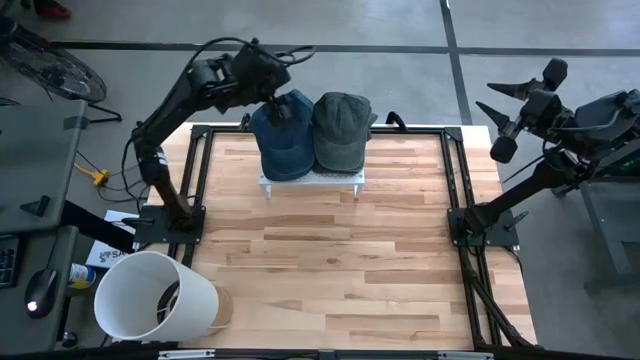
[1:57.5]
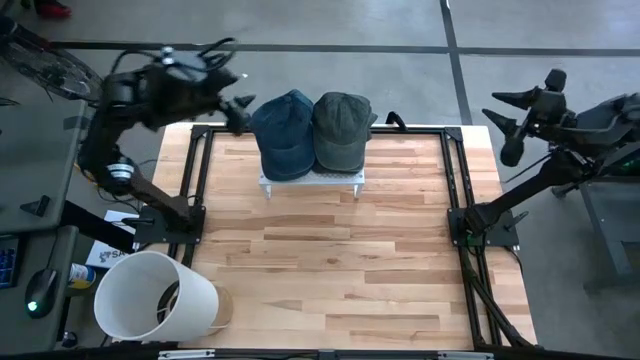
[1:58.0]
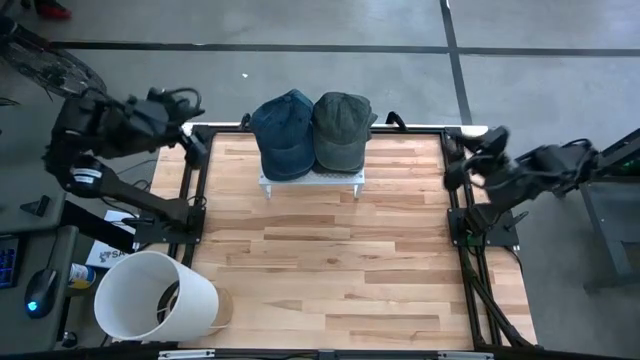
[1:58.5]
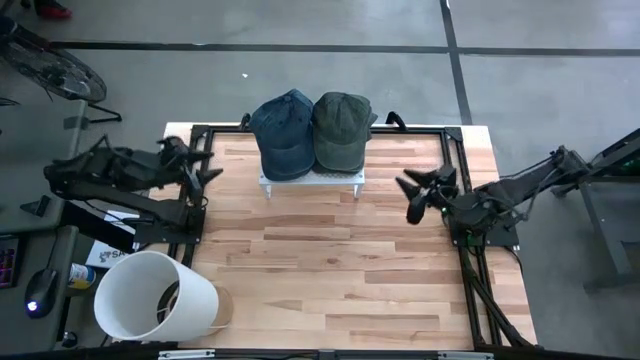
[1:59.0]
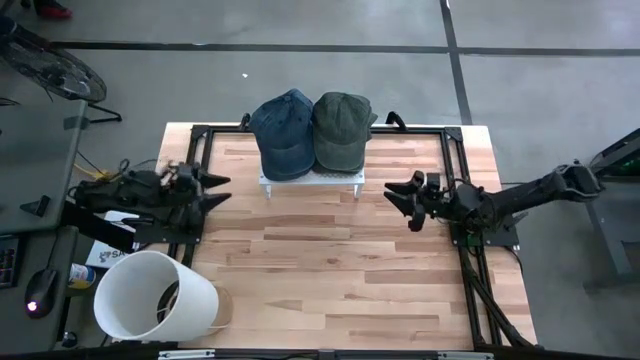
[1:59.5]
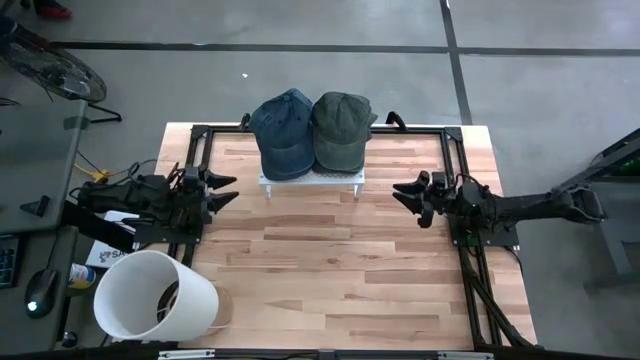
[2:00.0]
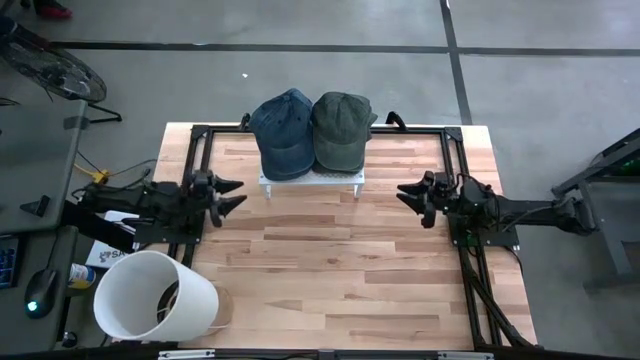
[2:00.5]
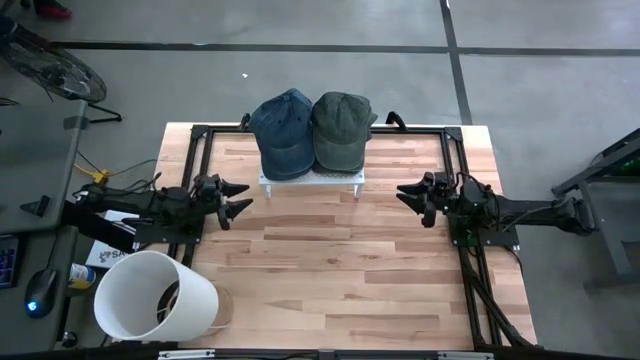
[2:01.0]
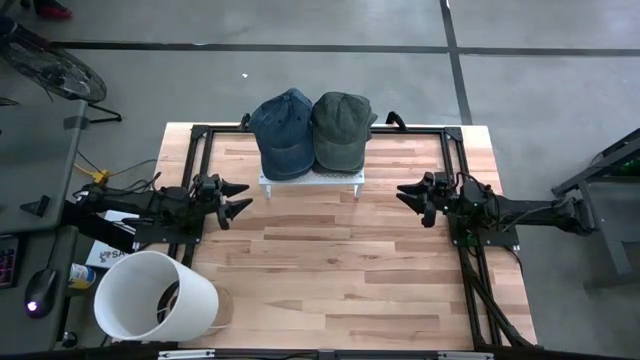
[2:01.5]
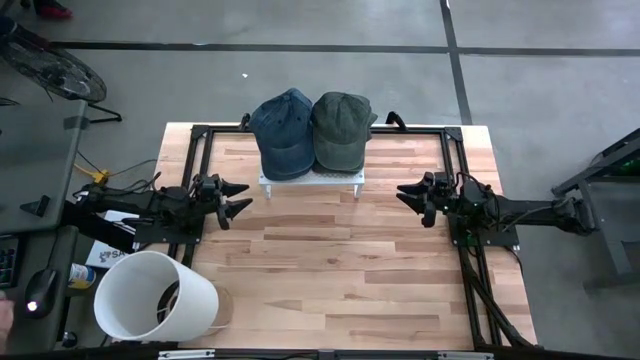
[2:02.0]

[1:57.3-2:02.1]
Task: Pick & Place hat
Return to Home Position

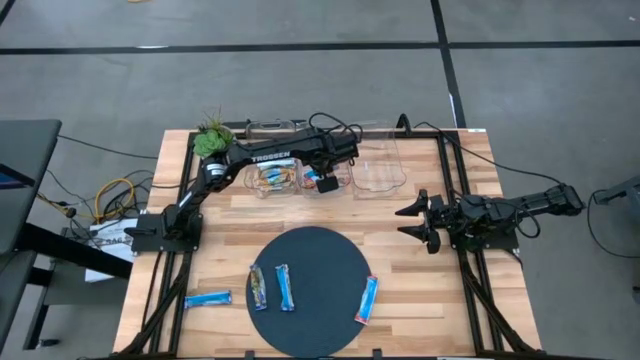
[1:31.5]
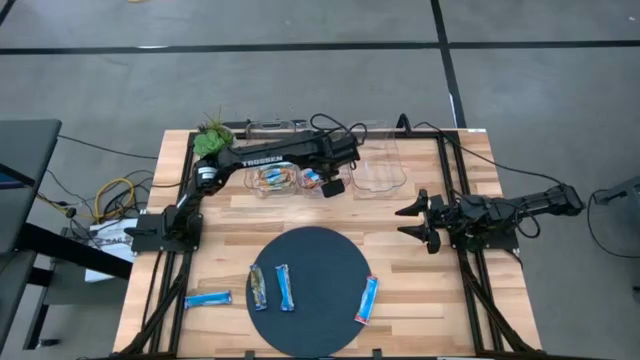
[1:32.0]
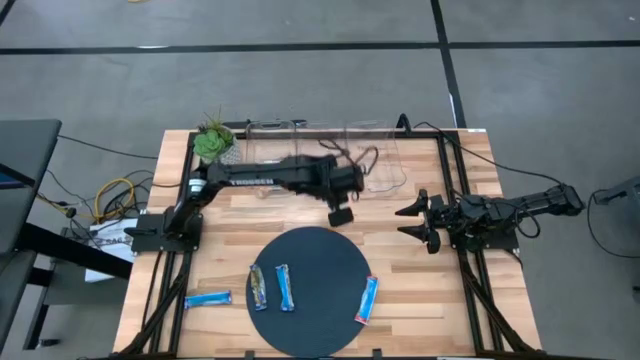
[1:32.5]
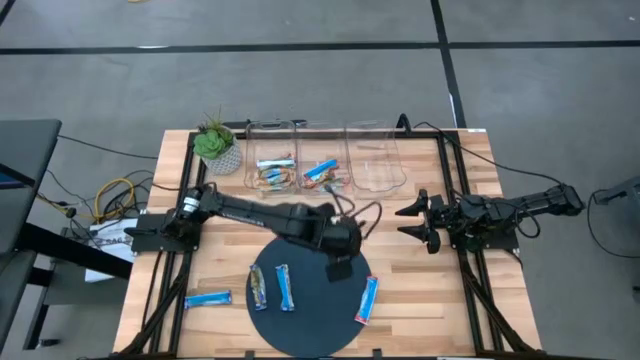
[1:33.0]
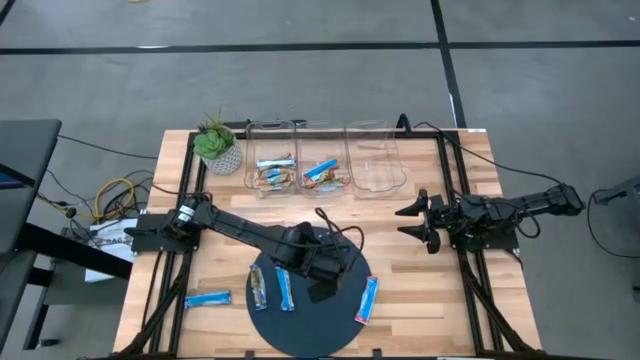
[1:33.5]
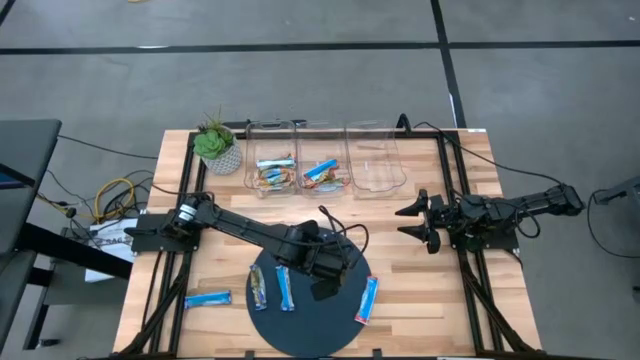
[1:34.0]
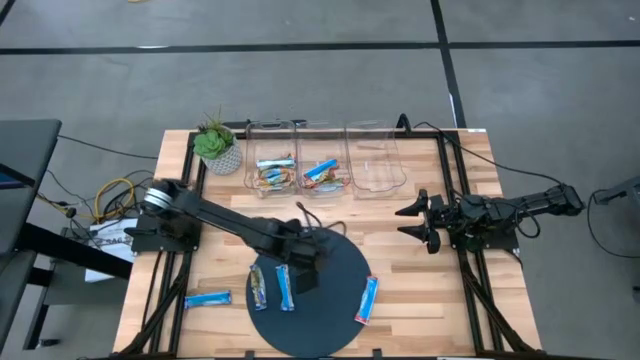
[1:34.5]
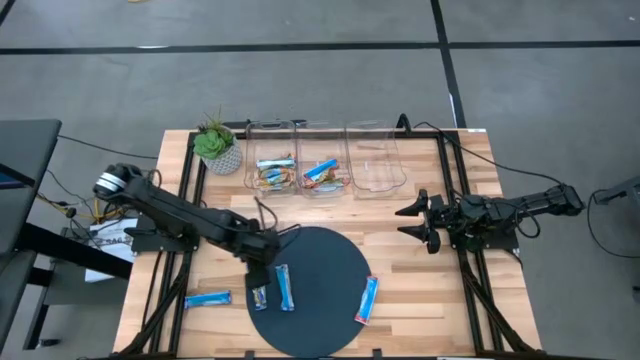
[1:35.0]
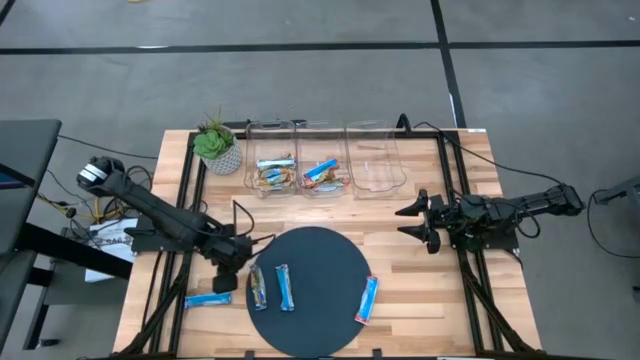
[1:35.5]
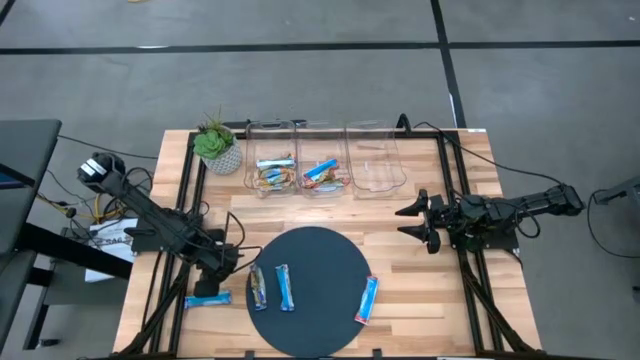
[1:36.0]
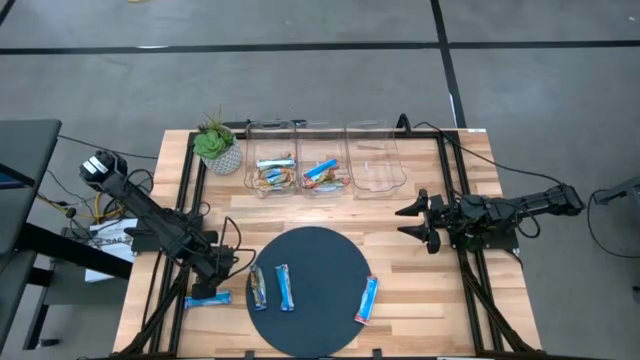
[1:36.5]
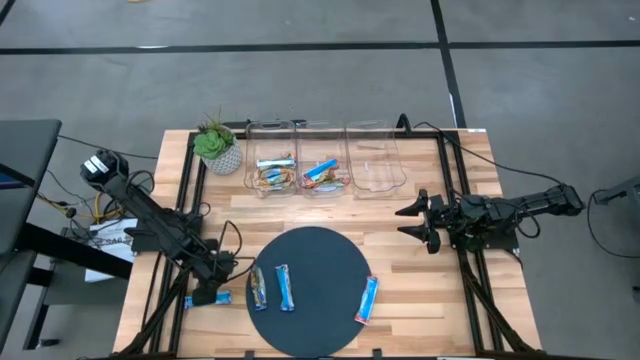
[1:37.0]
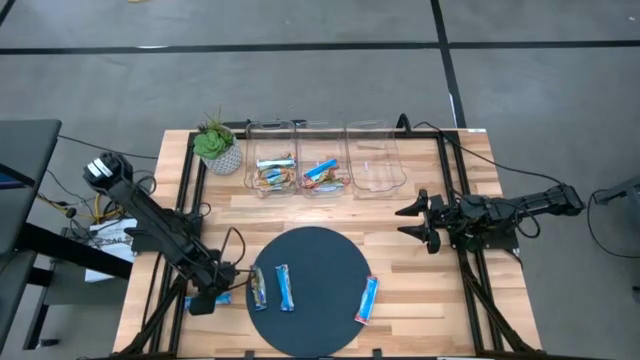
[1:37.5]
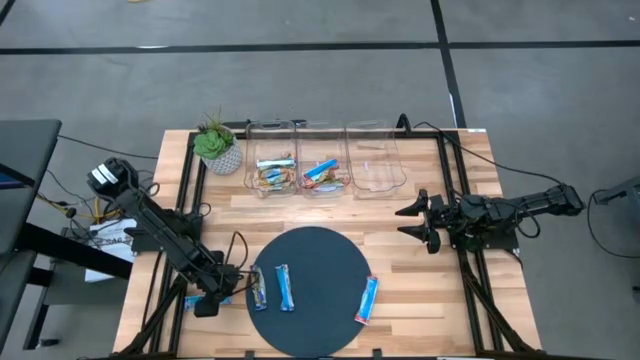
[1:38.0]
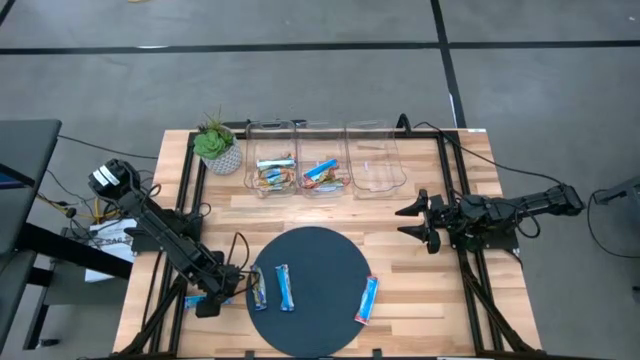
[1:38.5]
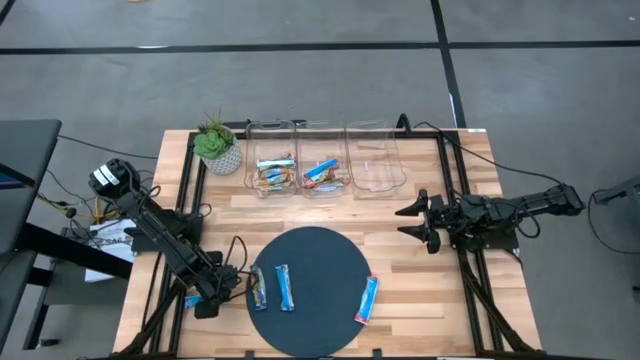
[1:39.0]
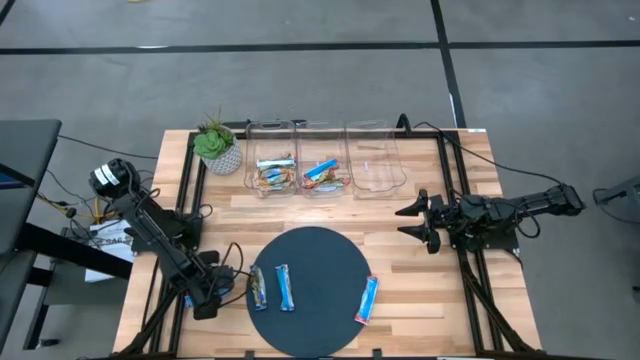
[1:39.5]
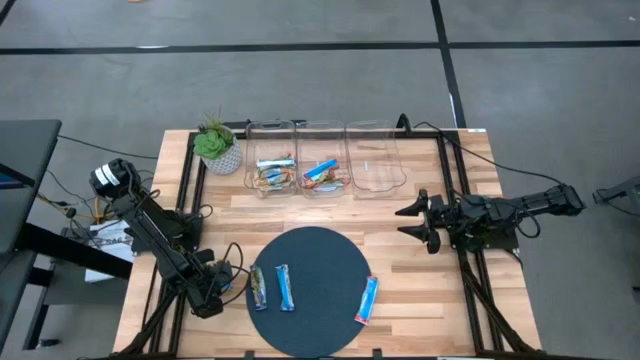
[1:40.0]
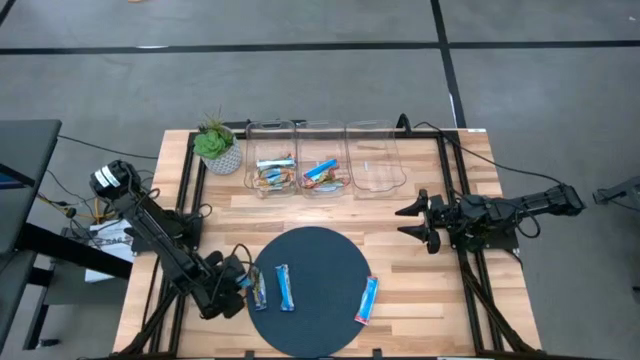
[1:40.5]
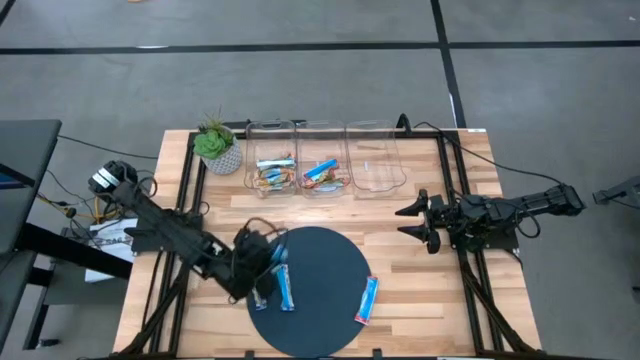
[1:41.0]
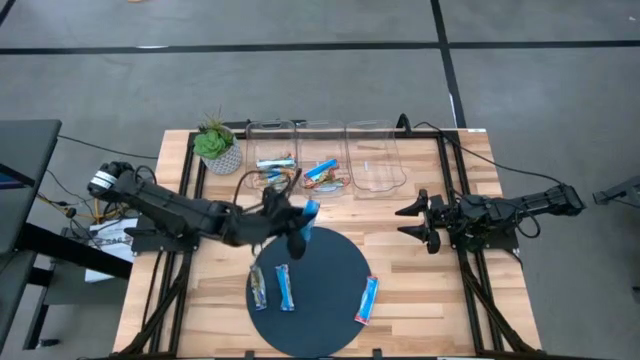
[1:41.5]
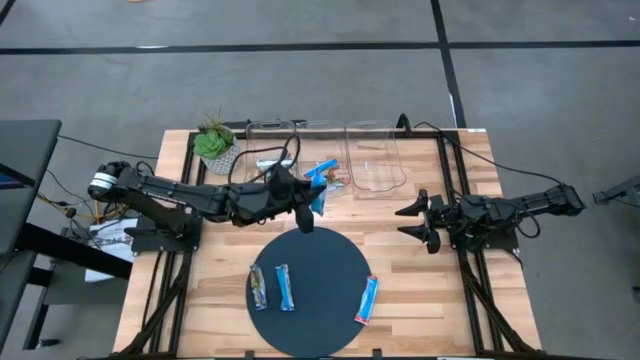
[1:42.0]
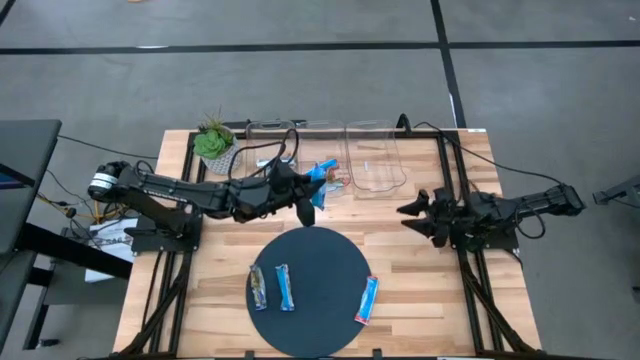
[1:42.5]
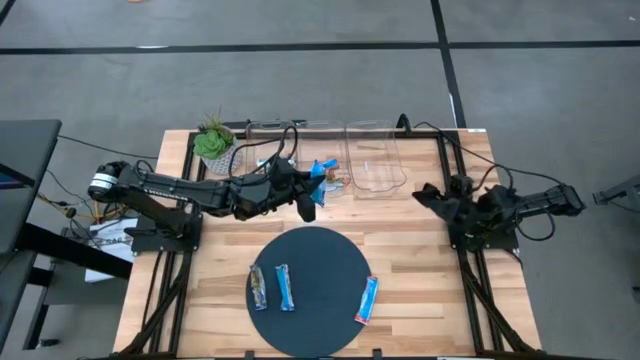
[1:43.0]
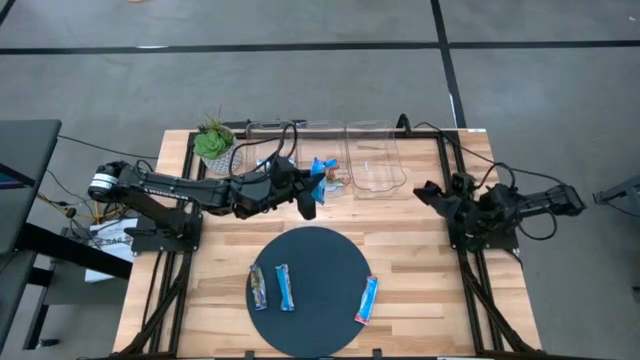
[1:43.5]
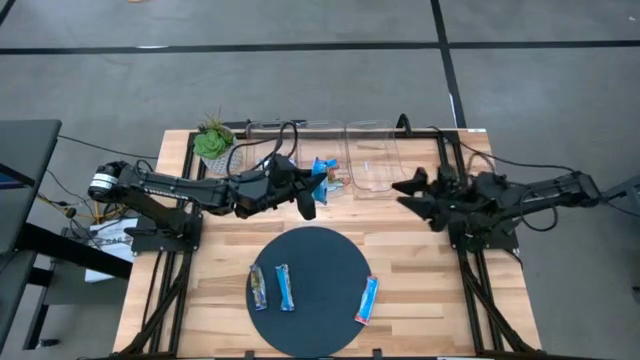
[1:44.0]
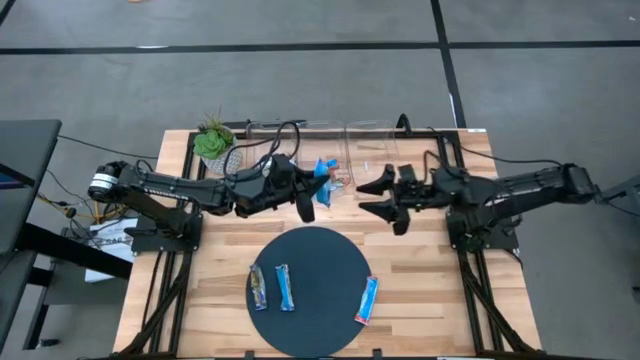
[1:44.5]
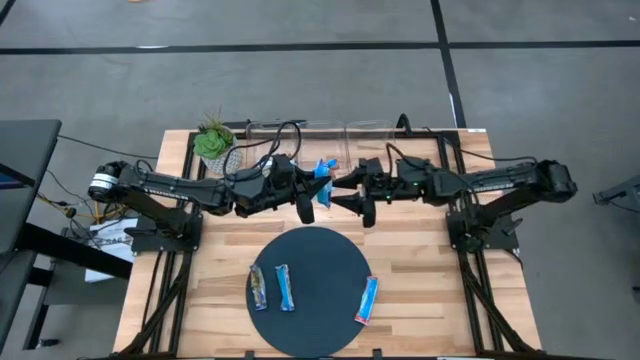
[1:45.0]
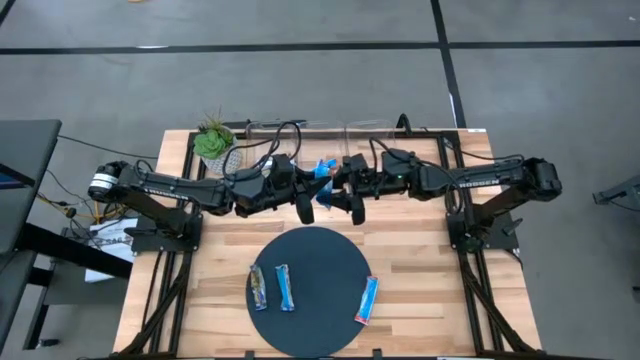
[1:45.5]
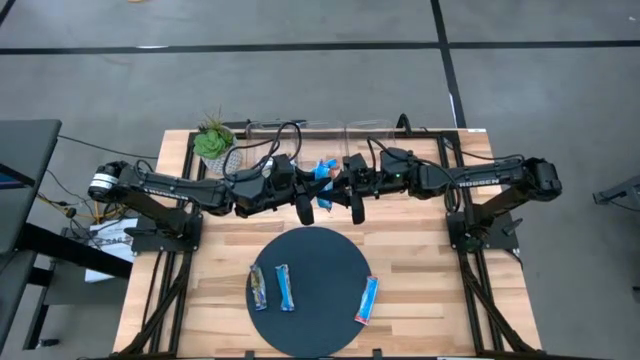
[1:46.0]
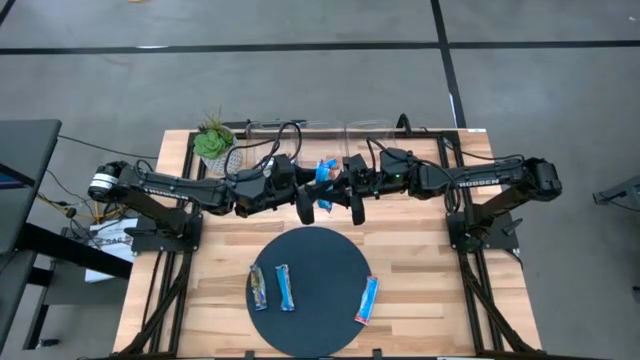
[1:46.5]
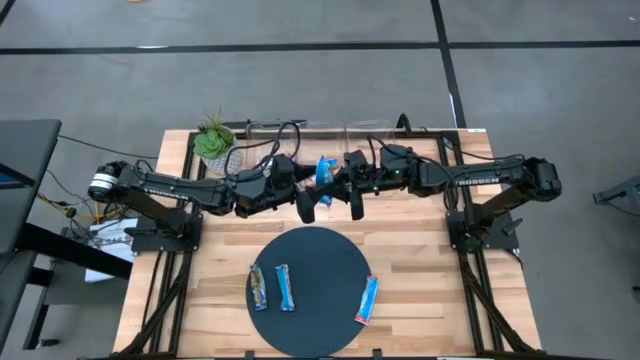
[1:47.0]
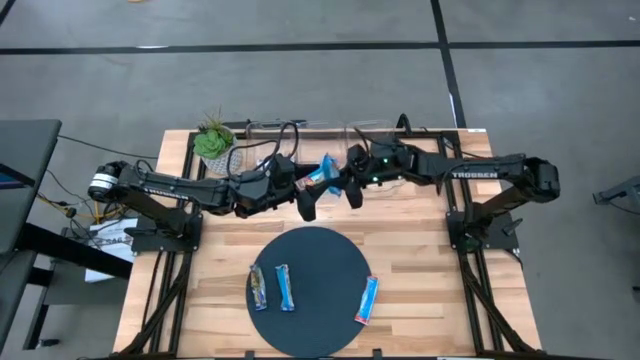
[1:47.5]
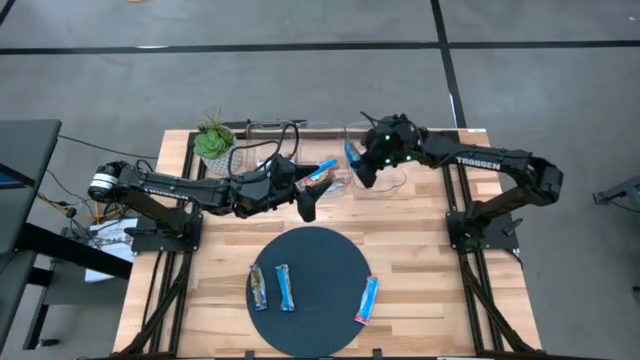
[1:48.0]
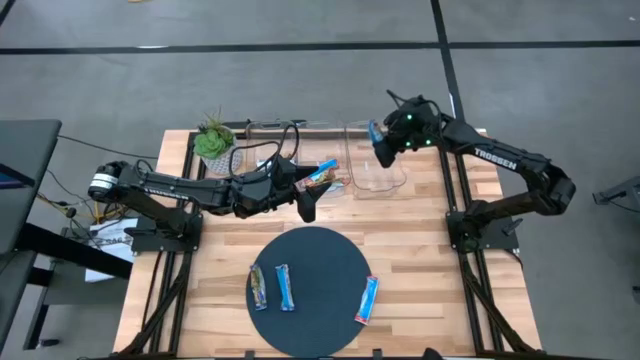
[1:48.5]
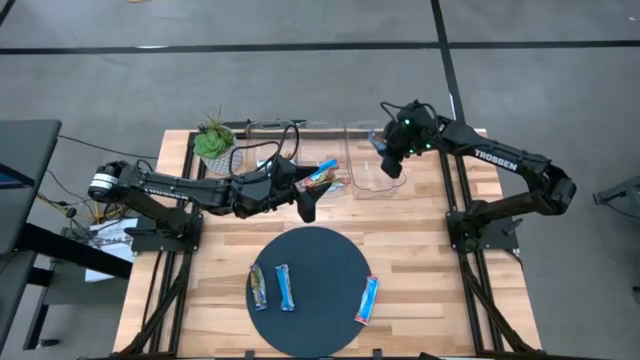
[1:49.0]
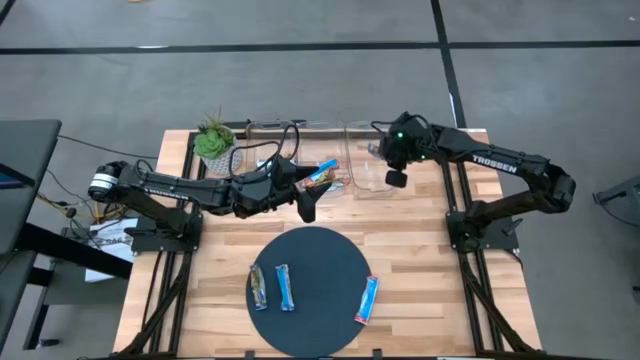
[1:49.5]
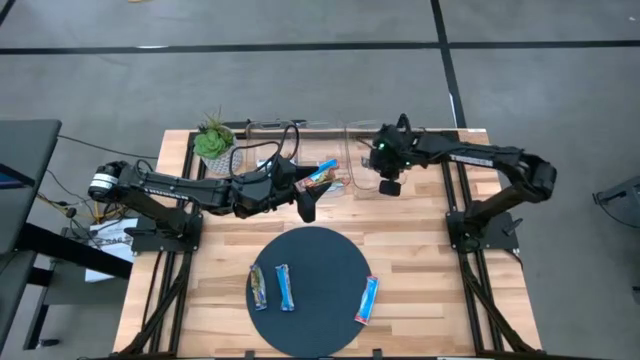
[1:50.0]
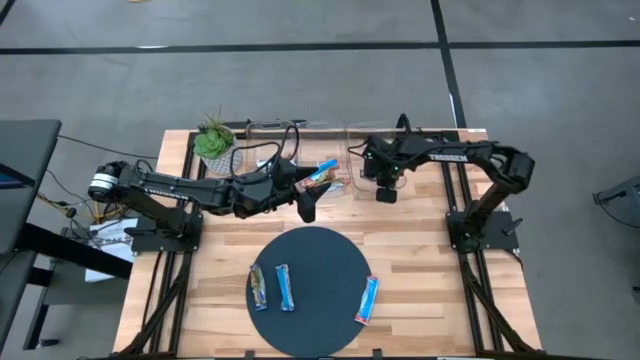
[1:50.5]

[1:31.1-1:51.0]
Task: Pick and place Granola Bars by type
Put the blue bar into the right transparent bin
